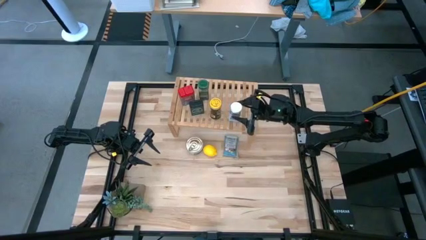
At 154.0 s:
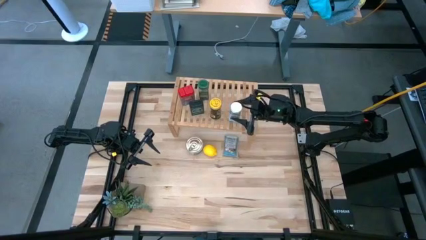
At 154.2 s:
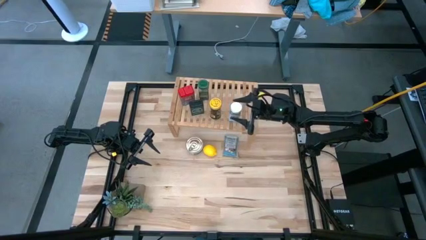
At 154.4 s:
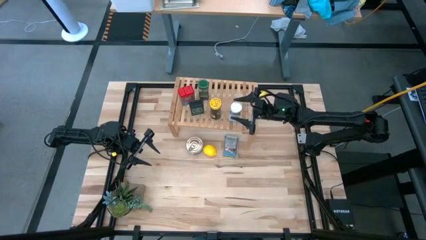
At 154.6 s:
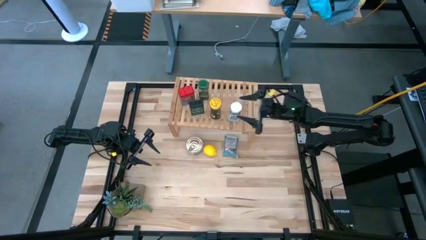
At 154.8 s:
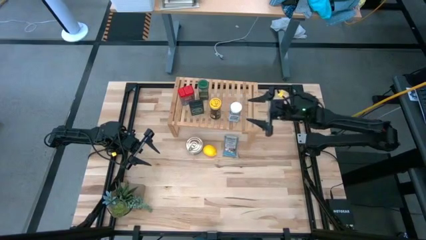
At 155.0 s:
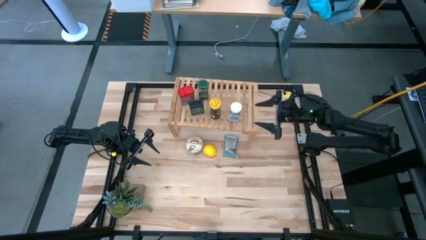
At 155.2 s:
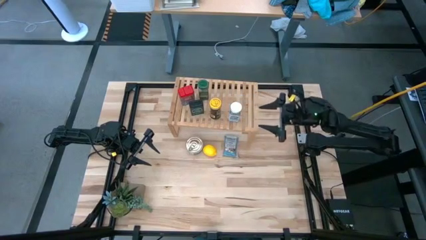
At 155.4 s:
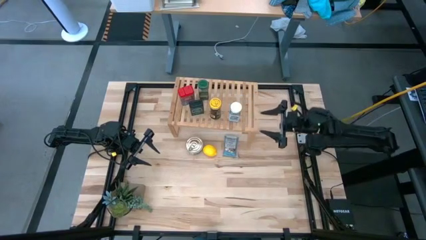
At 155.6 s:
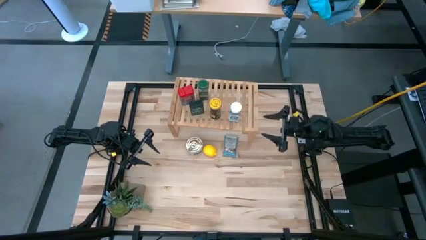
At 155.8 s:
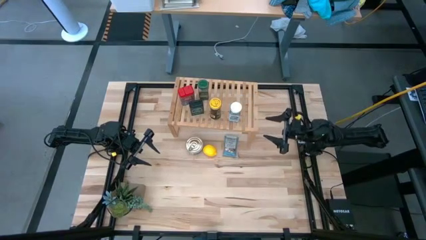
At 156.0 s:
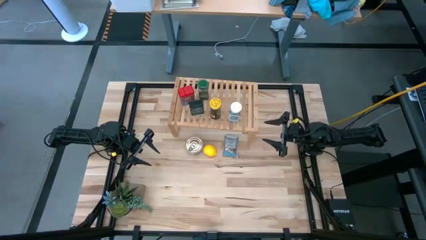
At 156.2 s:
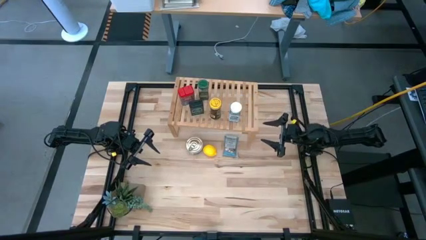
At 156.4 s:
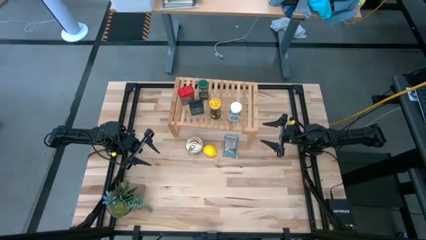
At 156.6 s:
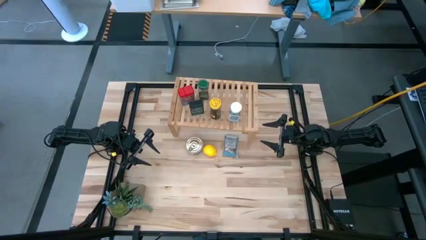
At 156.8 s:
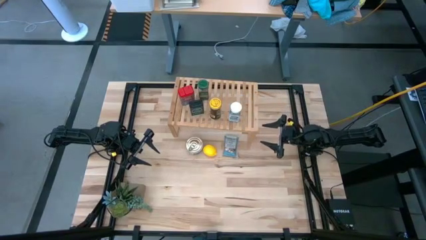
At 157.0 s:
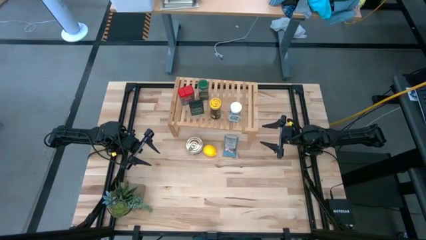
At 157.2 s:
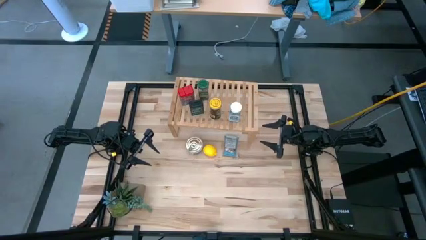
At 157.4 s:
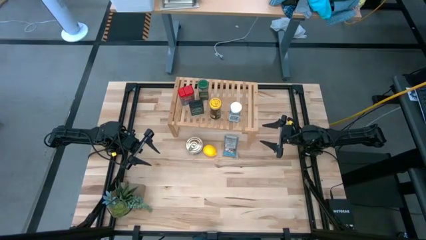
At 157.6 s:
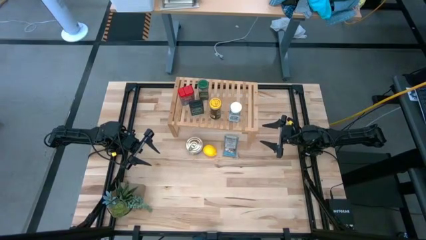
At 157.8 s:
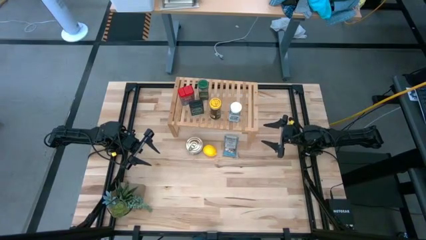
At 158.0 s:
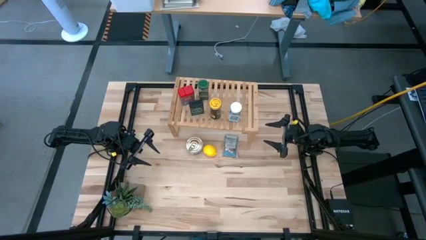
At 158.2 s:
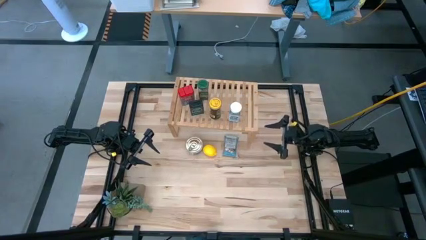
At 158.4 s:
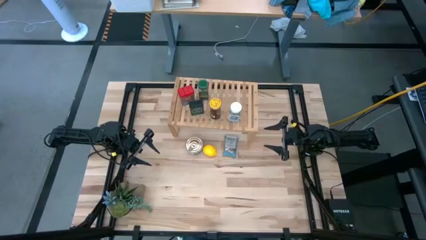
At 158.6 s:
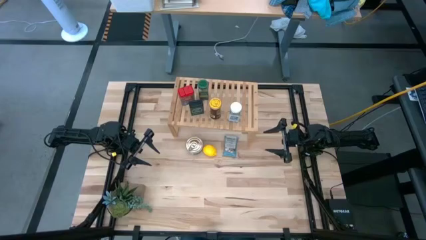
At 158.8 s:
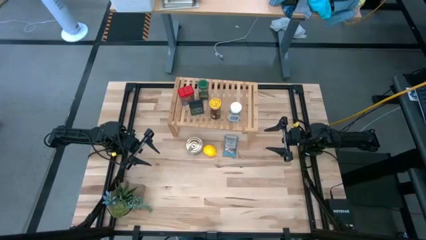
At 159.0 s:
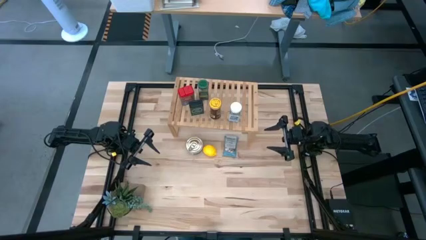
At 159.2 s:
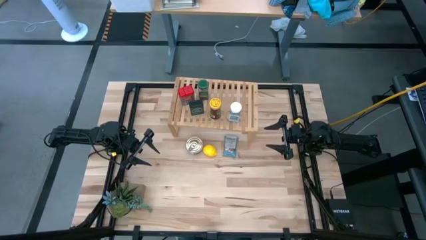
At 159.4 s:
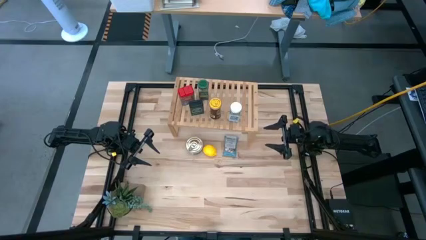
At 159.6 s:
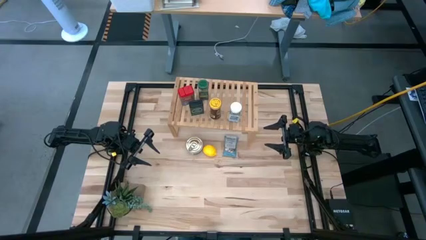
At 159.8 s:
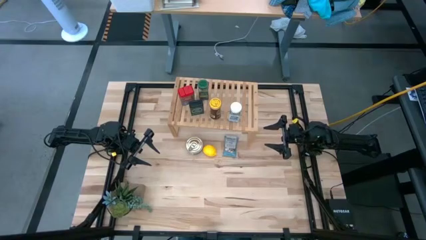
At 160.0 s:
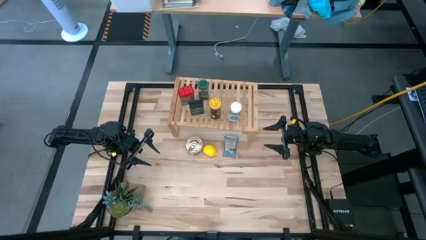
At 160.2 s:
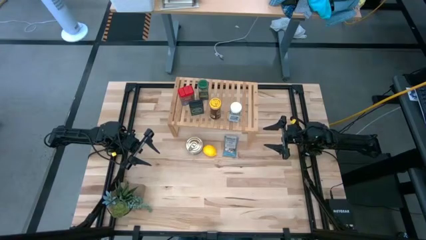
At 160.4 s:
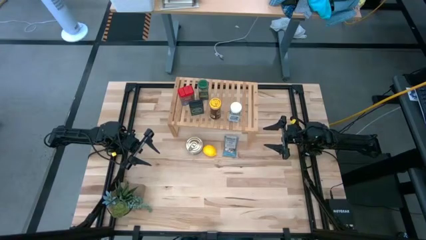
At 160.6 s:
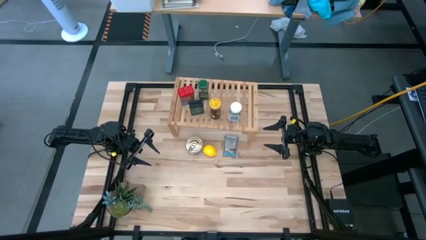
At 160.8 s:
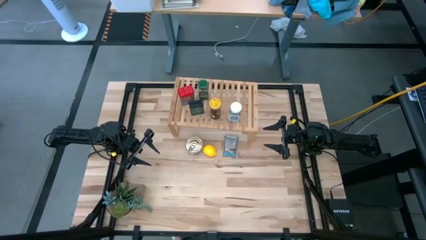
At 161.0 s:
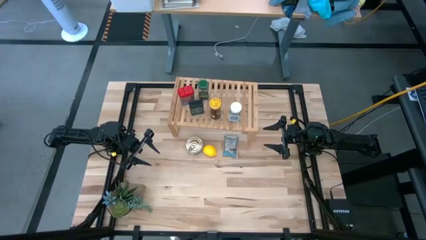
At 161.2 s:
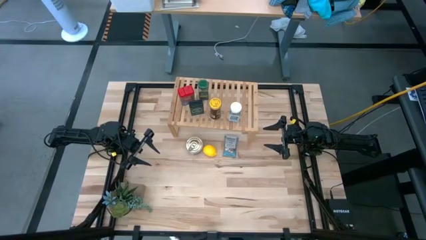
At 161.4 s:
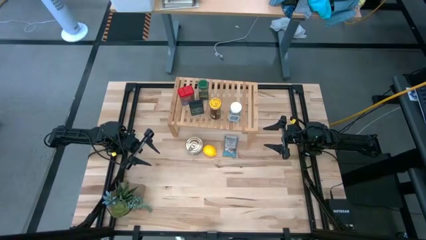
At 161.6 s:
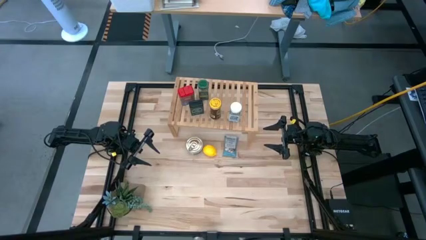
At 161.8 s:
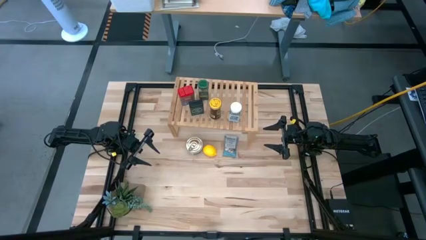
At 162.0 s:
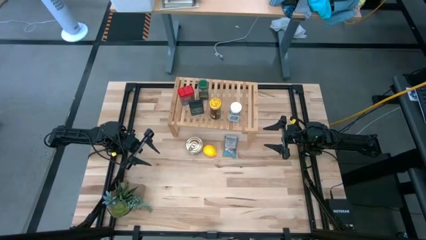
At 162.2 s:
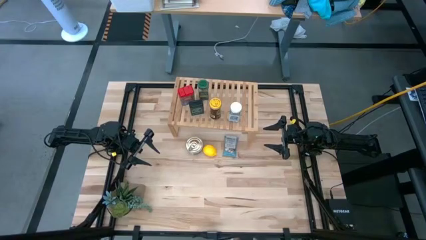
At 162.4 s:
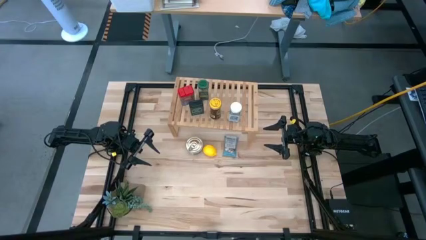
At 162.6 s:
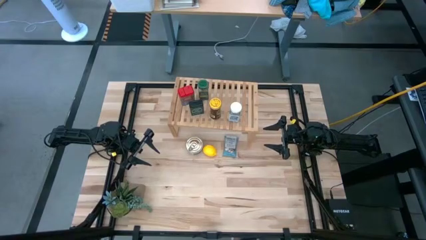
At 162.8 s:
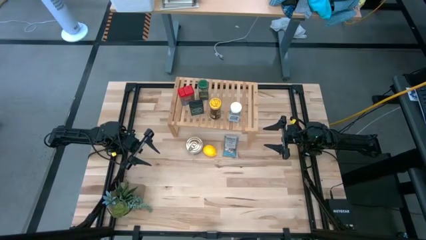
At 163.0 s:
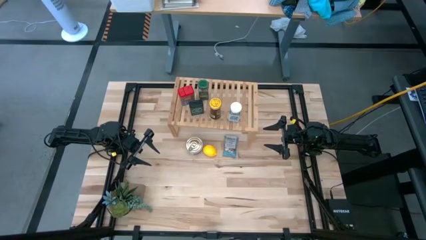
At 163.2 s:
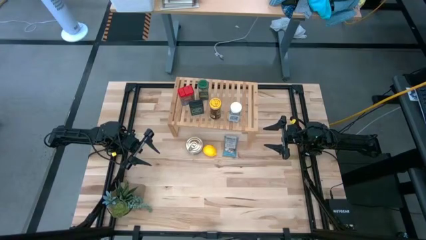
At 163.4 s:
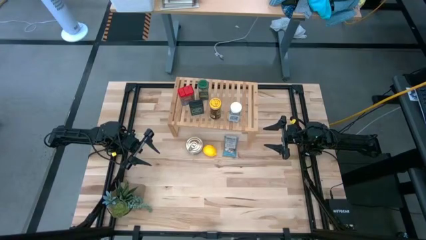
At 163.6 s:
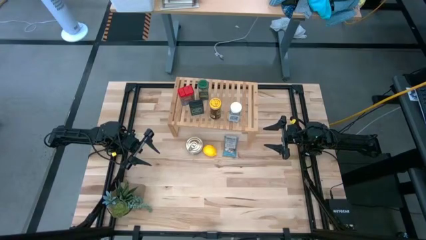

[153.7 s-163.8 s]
Task: Shelf spices
Return to Home Position
